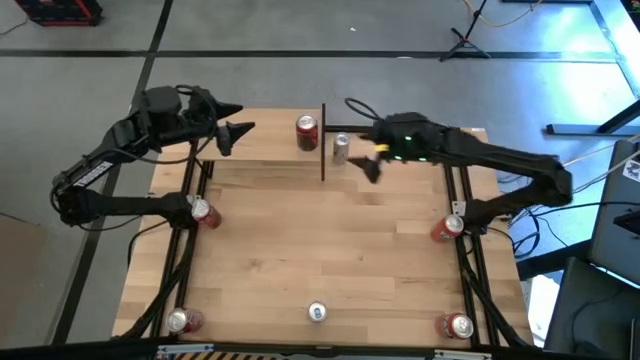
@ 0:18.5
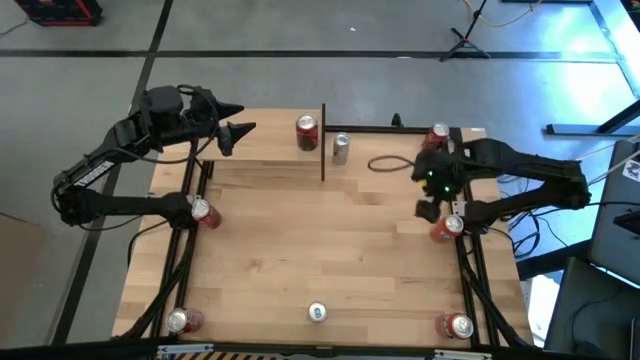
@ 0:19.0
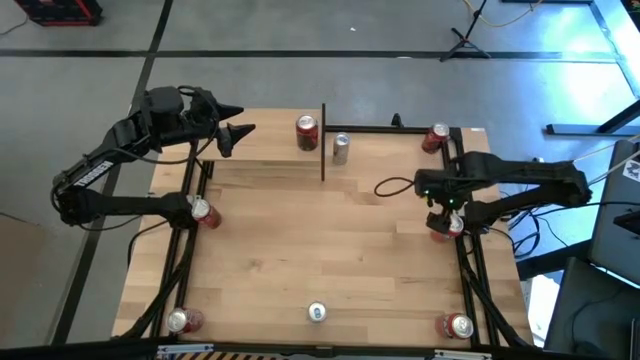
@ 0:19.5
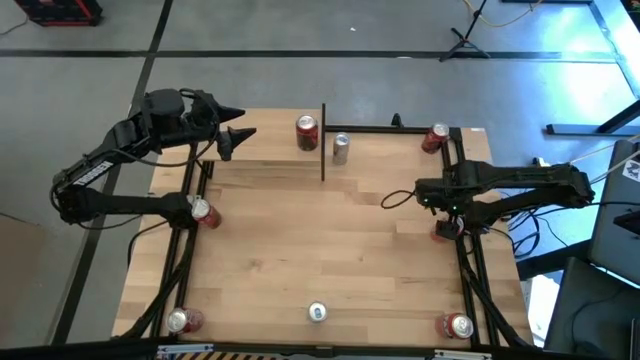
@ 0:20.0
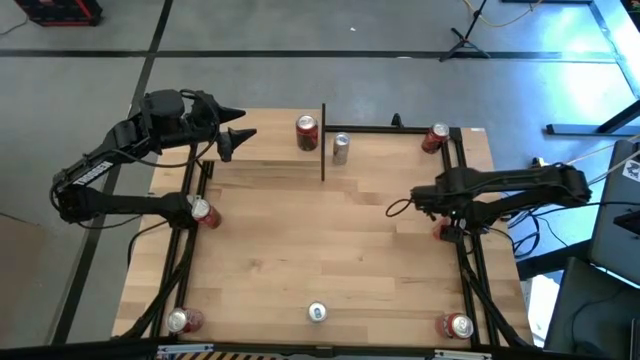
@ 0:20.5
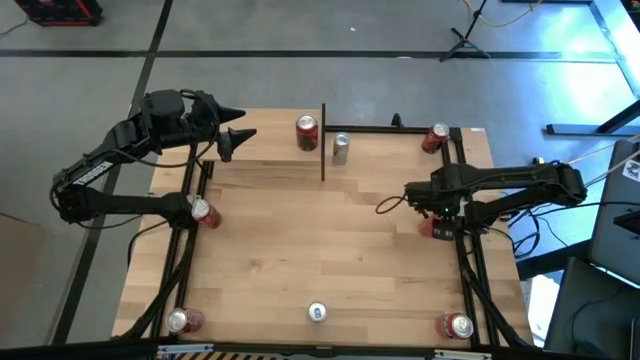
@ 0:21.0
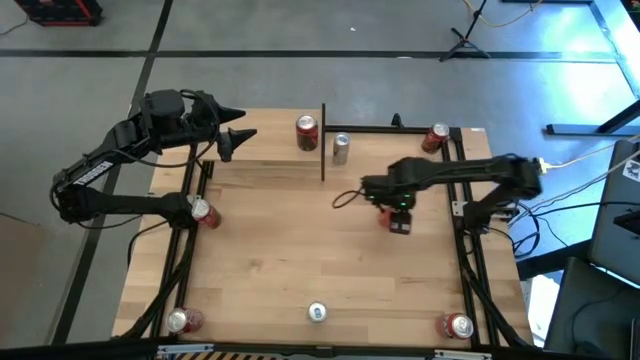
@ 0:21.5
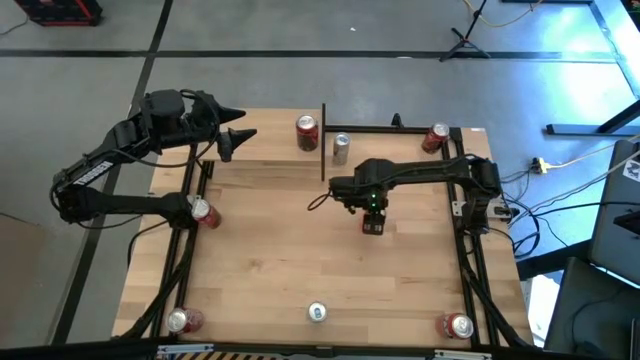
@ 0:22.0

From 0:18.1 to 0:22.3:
Task: Place canned beverage on shelf
Move the top red soda can to the center of the table

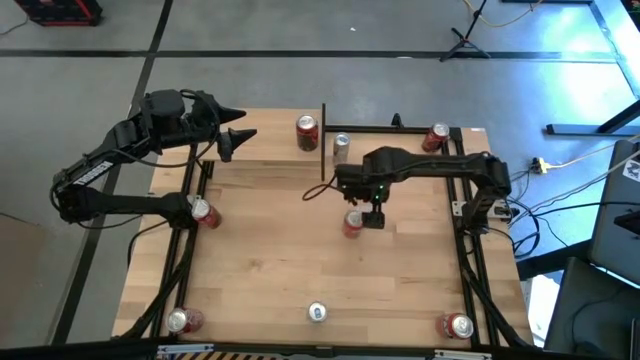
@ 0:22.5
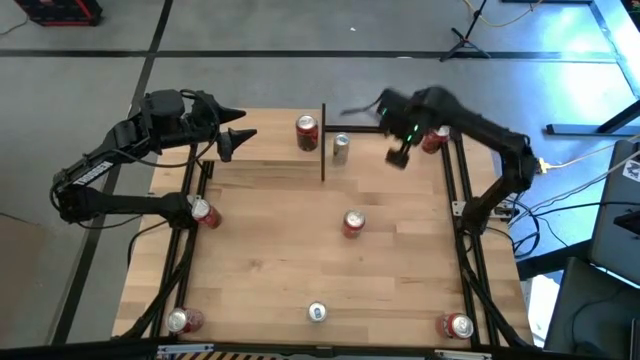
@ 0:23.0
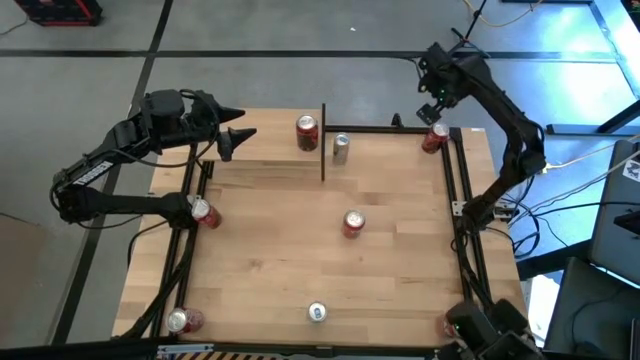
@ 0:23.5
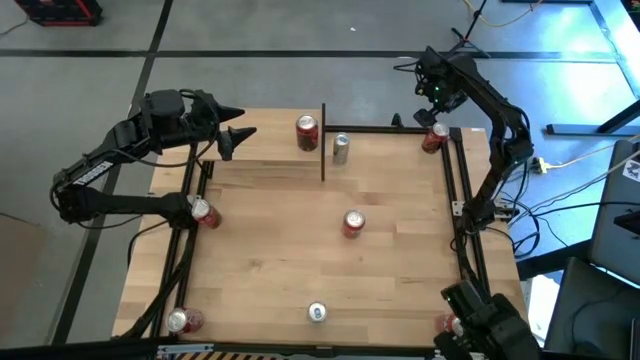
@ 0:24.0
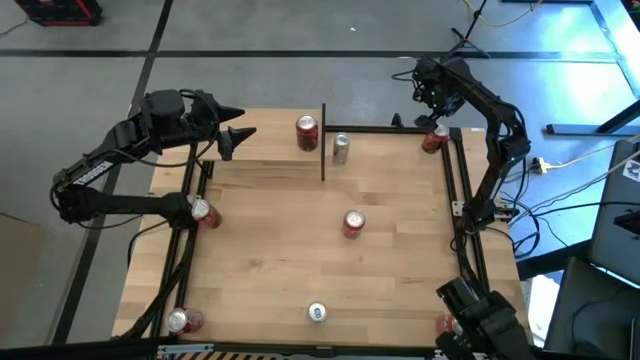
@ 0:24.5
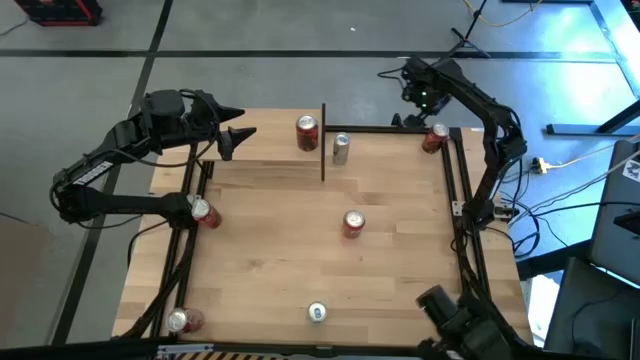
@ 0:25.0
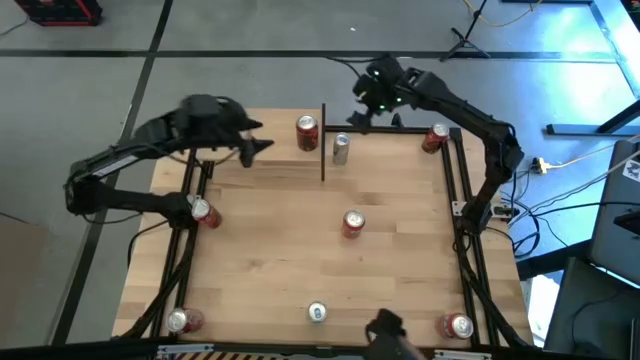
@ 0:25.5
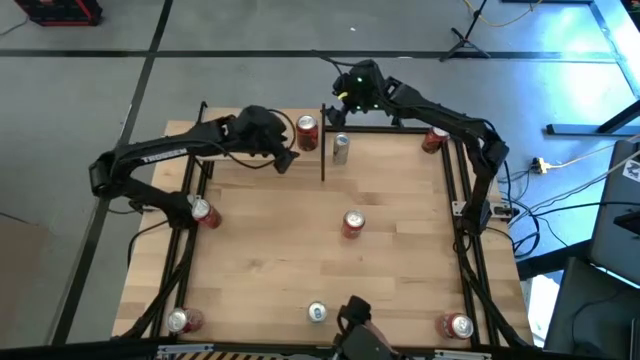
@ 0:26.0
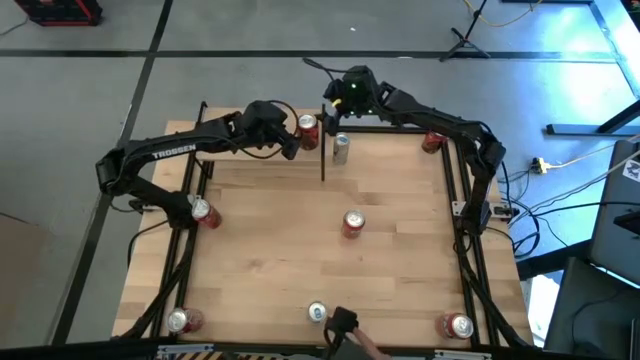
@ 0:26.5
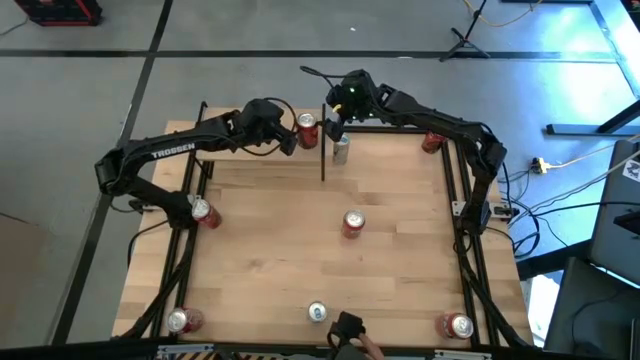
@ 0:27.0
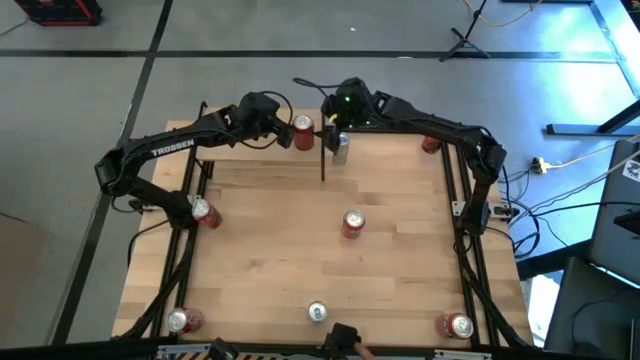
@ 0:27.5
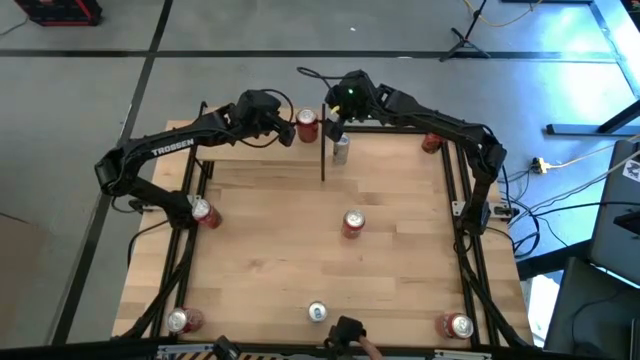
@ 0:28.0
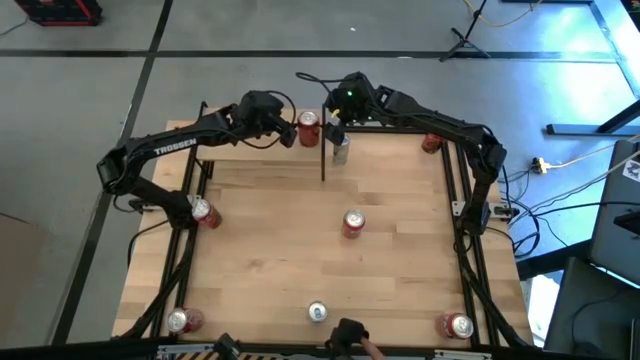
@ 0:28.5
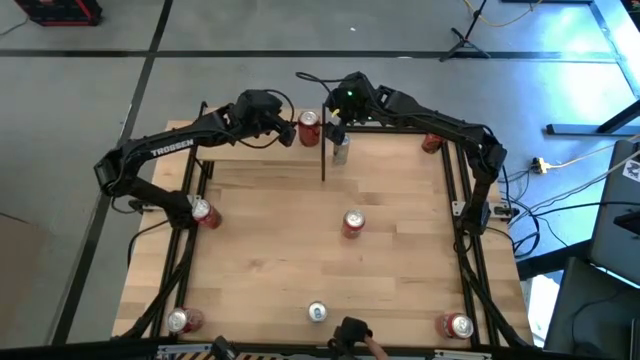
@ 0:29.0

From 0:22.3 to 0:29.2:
Adjust the red-black soda can on the shelf

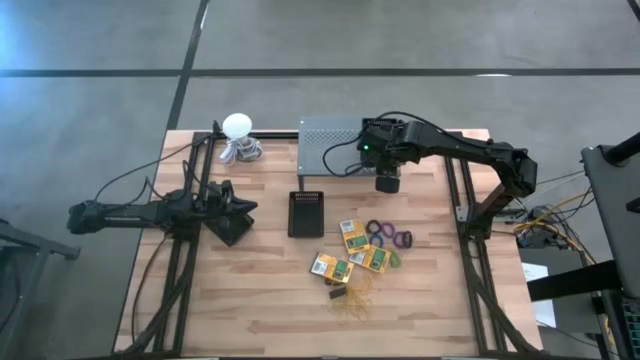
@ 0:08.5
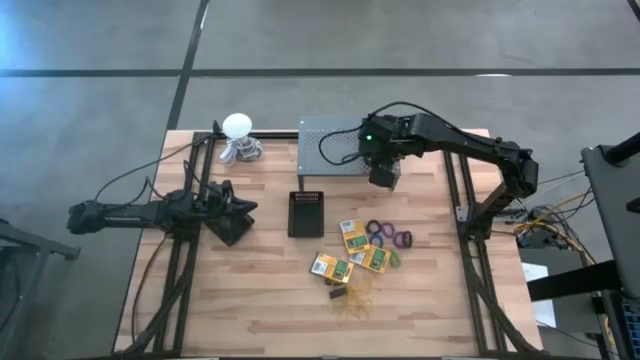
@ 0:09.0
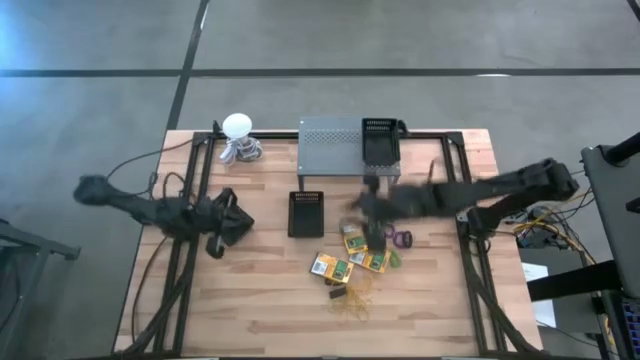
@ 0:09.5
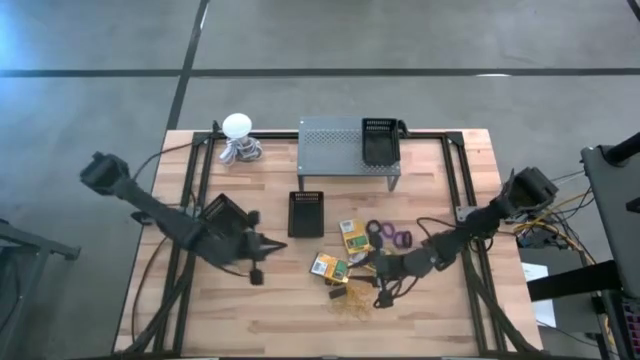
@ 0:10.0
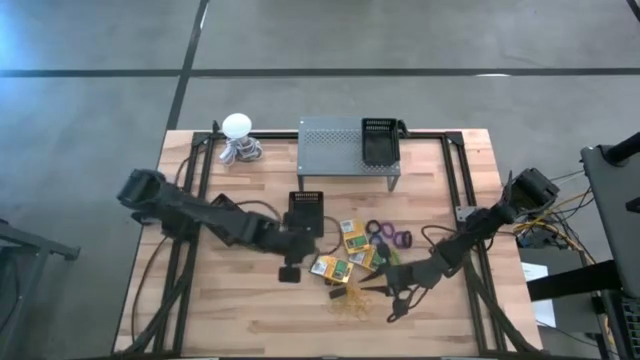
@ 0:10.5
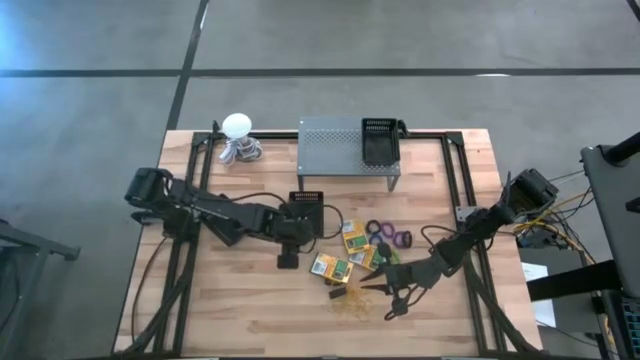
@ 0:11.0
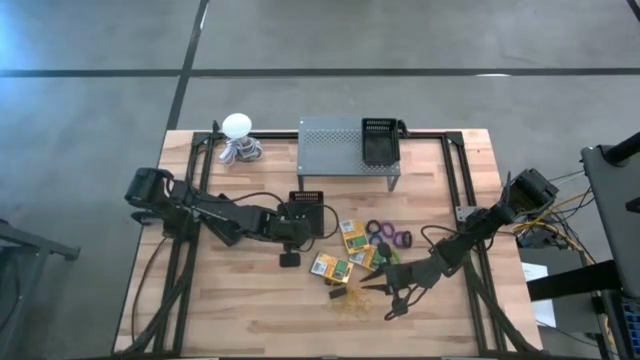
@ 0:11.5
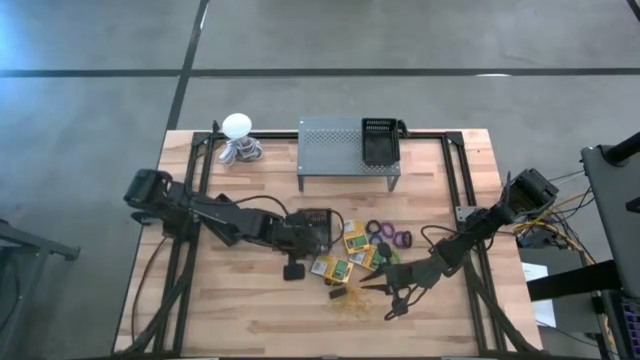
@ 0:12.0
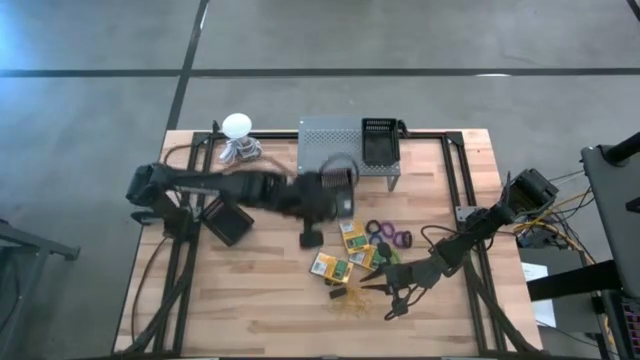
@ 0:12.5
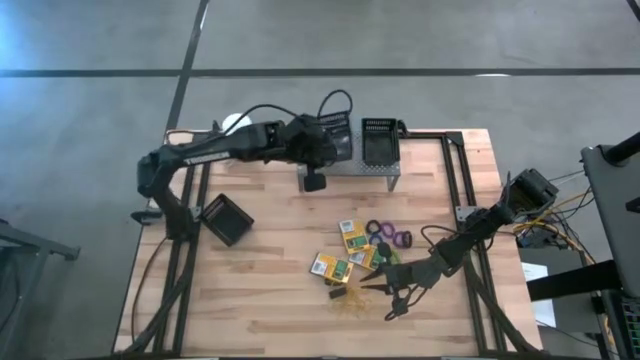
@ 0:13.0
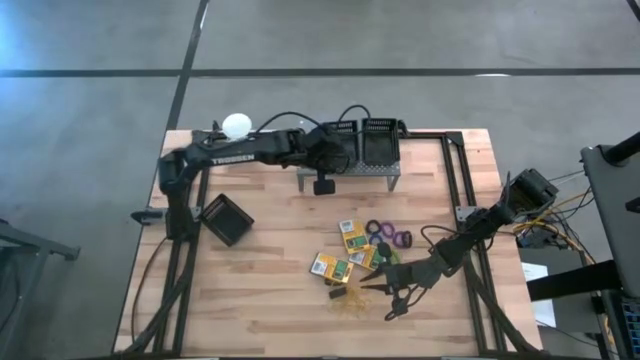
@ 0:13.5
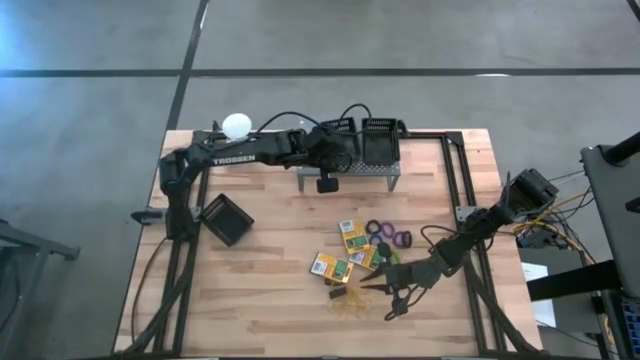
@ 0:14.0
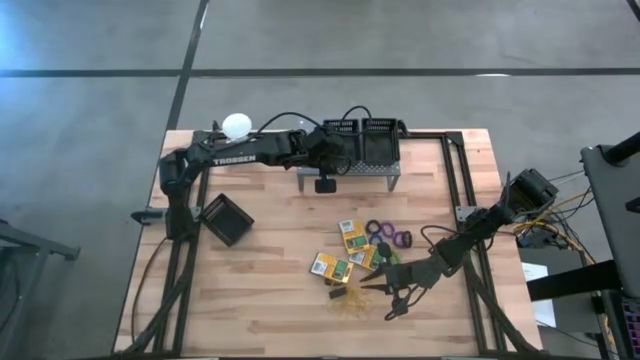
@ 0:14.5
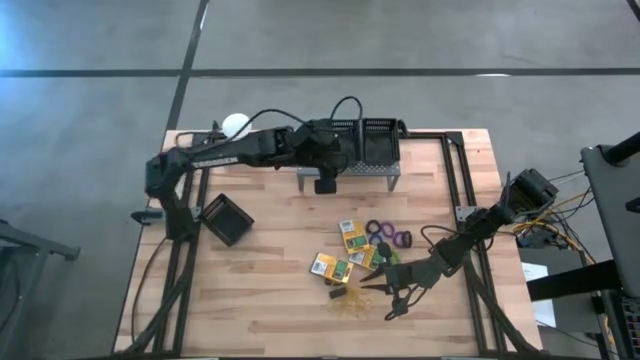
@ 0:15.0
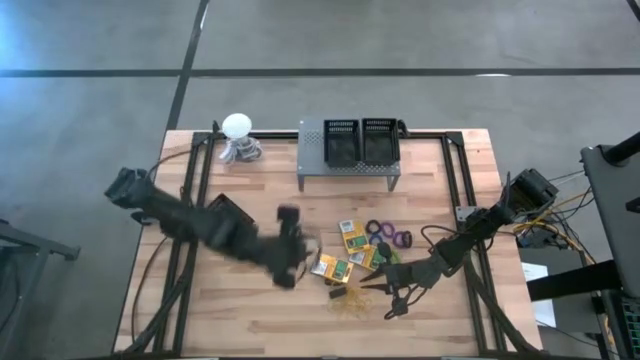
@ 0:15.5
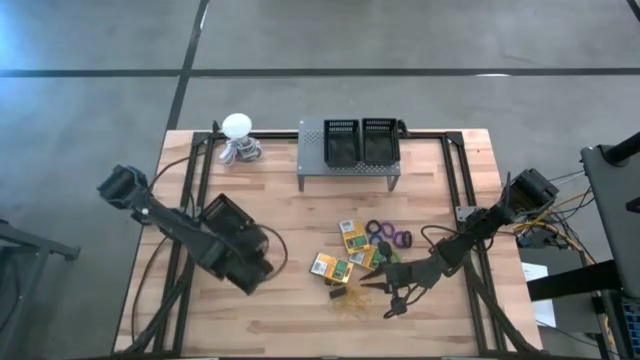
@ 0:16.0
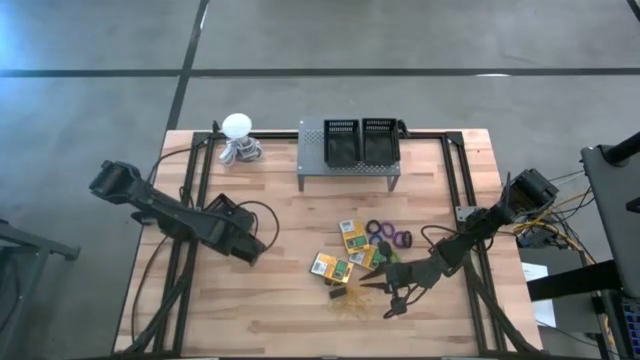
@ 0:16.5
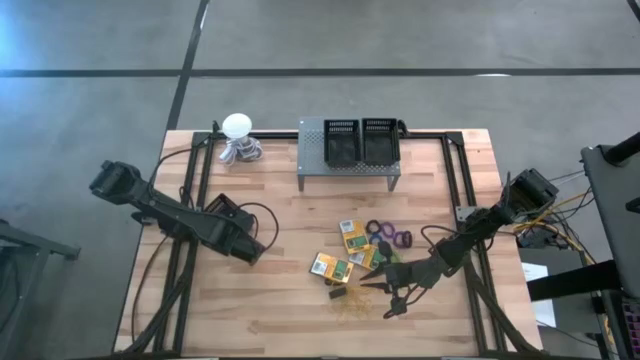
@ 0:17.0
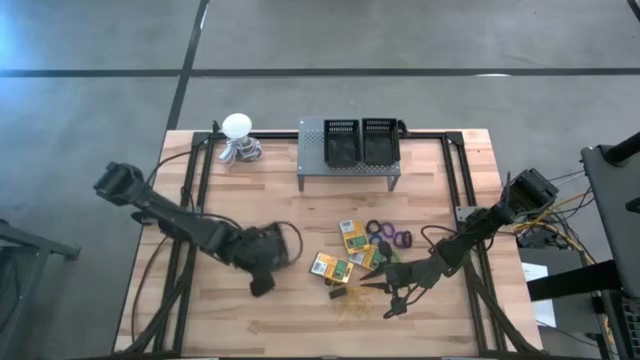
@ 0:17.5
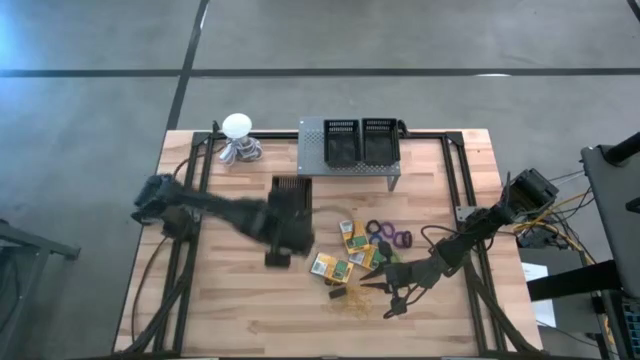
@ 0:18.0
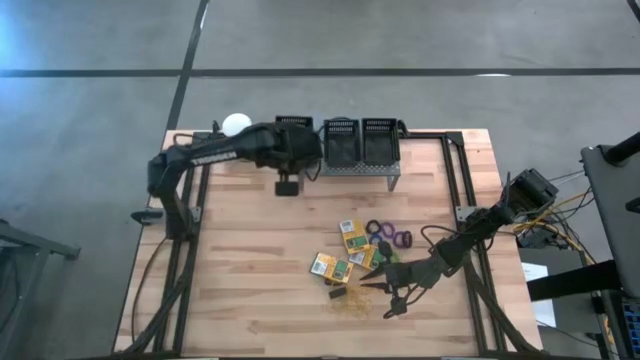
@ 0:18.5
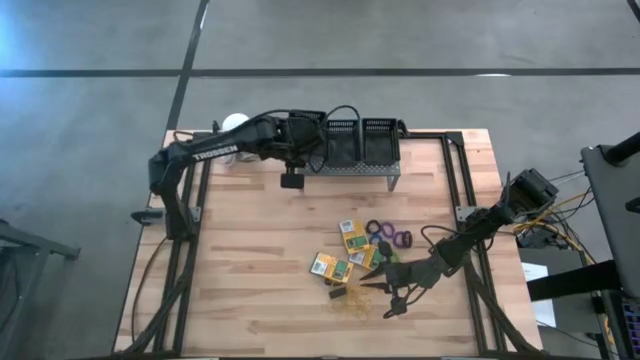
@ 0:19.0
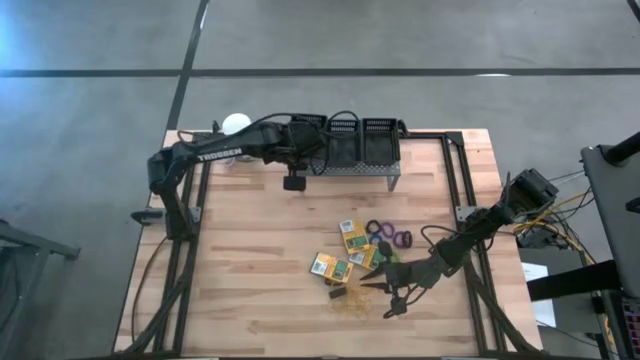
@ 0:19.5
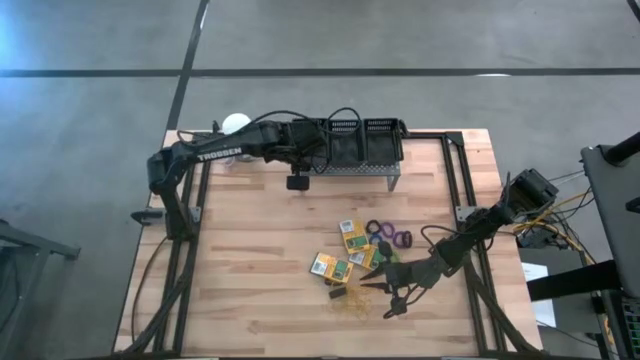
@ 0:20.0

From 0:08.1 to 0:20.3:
Task: Pick & Place Office Desk Supplies
Put the black bin on the shelf
